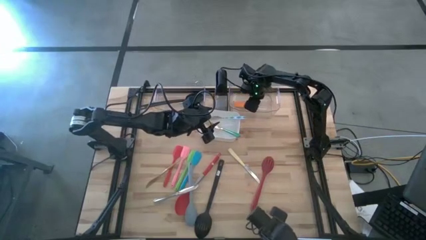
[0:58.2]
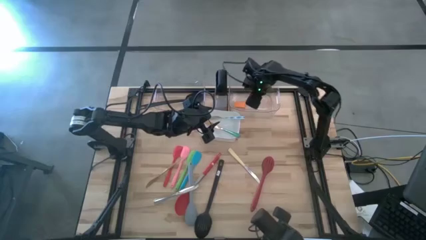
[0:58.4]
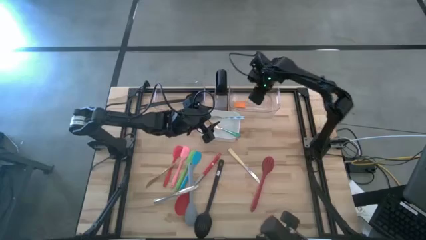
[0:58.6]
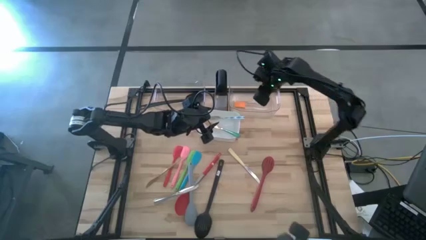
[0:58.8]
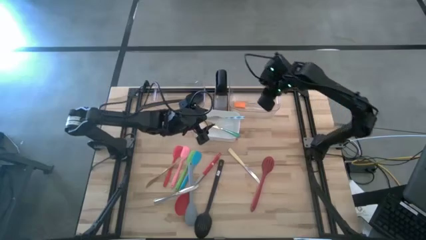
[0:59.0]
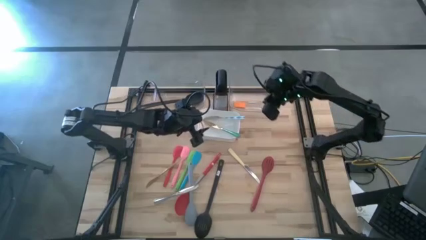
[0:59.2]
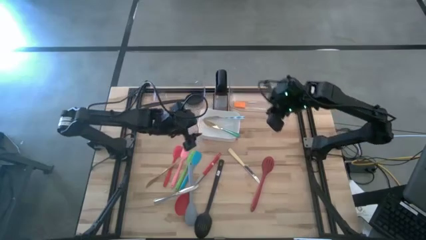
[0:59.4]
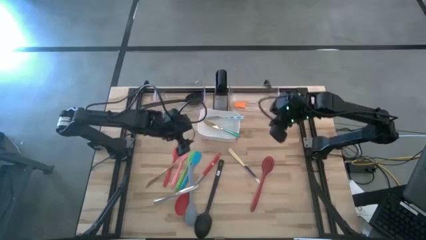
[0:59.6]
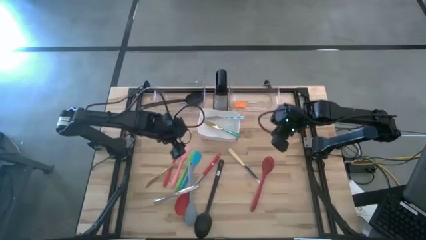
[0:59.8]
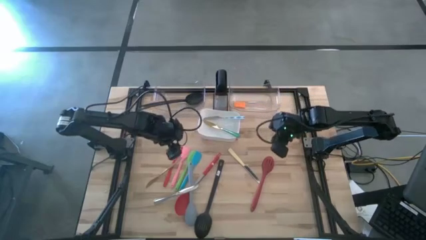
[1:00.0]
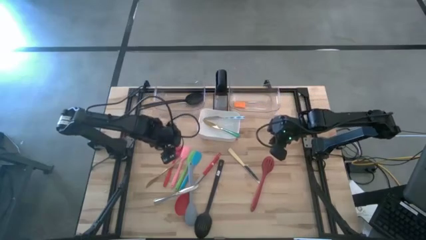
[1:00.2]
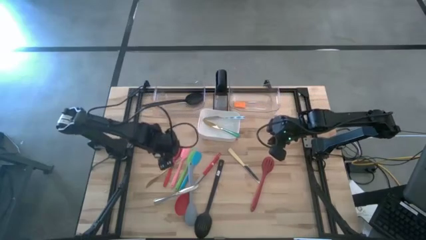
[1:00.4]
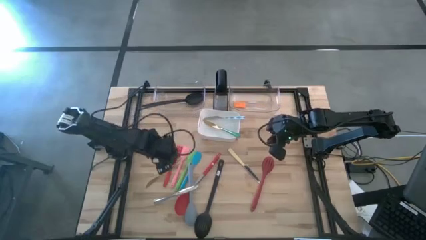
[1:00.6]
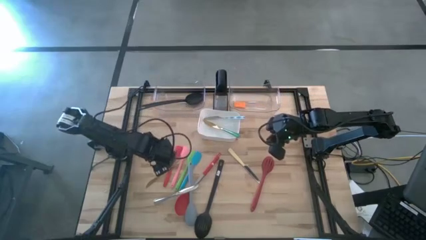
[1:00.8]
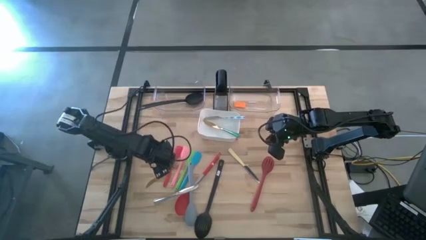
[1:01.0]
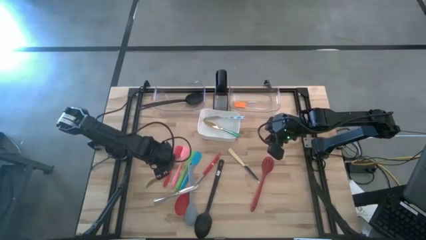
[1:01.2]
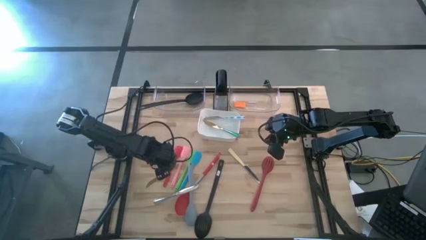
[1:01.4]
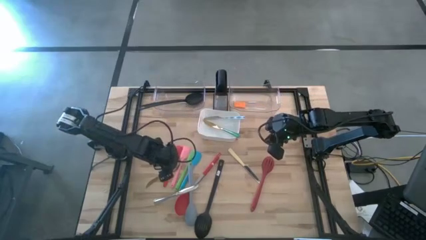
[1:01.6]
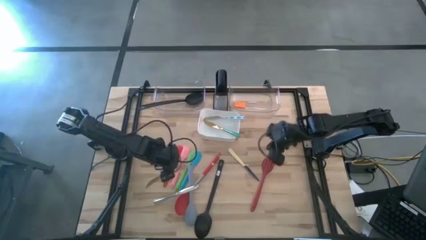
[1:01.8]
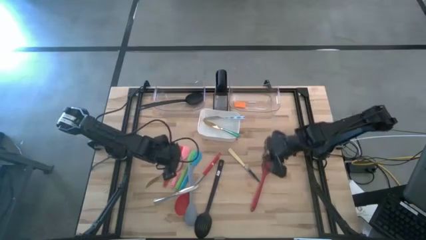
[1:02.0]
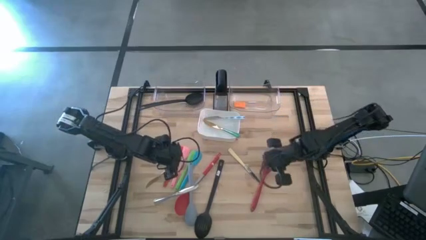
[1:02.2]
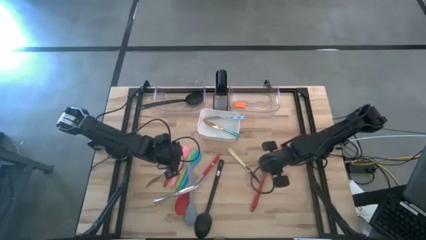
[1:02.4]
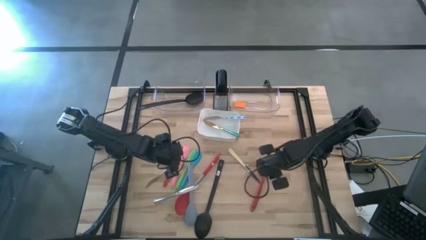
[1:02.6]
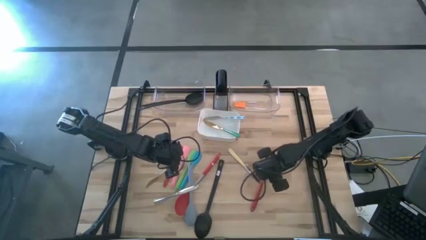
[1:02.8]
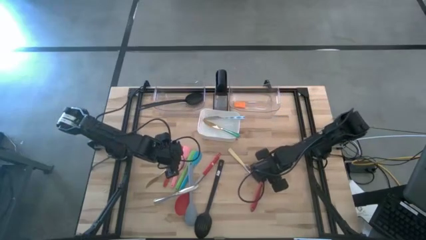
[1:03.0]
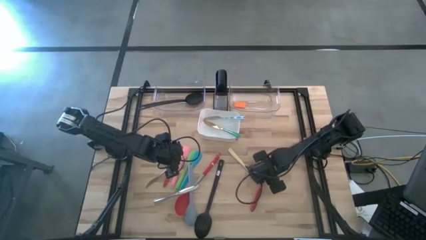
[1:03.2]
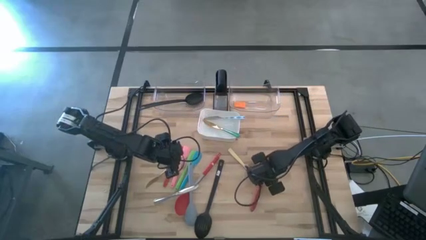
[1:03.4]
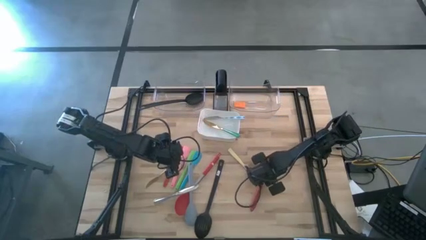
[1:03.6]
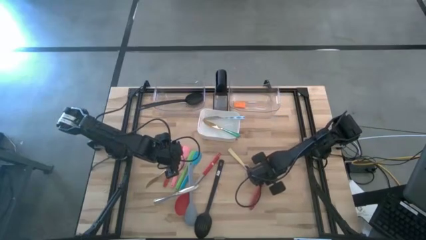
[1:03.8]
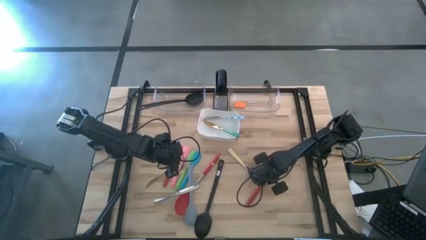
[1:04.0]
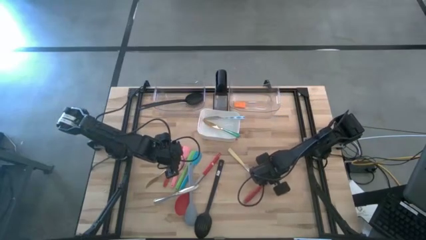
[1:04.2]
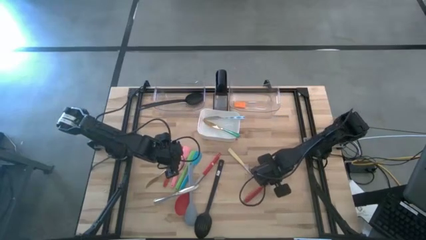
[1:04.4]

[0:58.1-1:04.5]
Task: Pick & Place Kitchen Items
Put the red slotted spoon into the left transparent bin

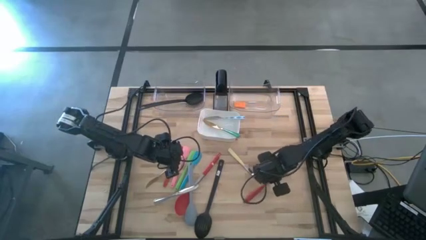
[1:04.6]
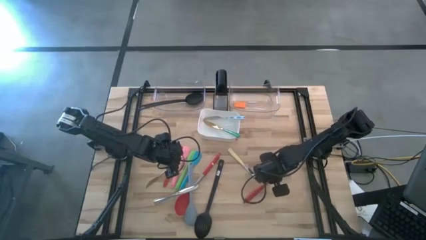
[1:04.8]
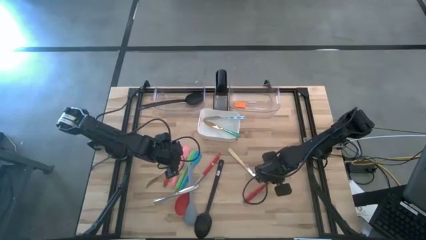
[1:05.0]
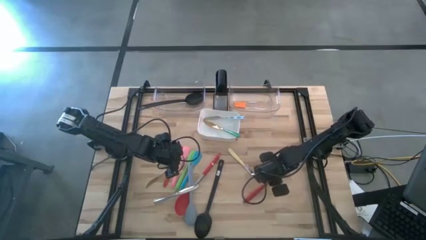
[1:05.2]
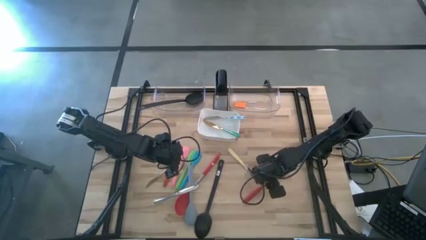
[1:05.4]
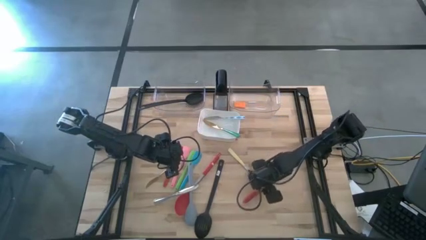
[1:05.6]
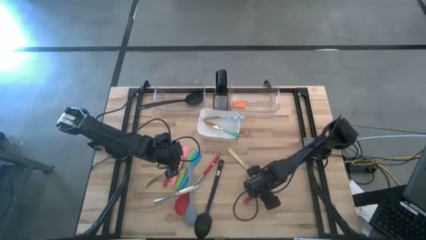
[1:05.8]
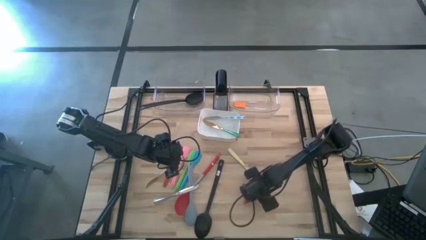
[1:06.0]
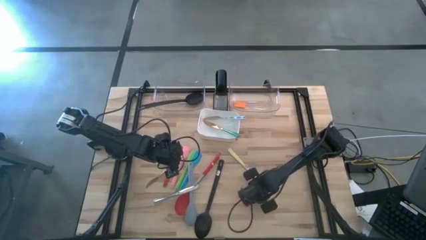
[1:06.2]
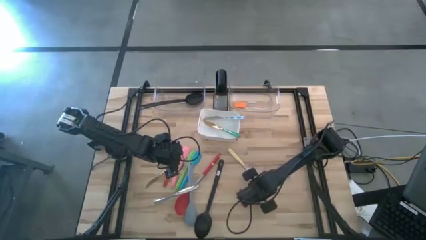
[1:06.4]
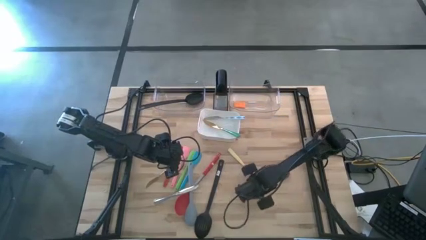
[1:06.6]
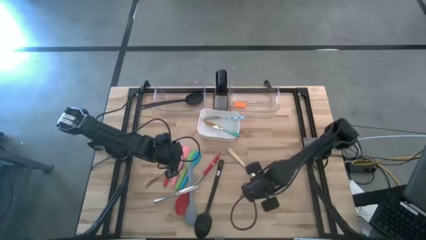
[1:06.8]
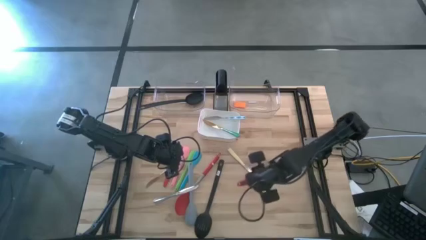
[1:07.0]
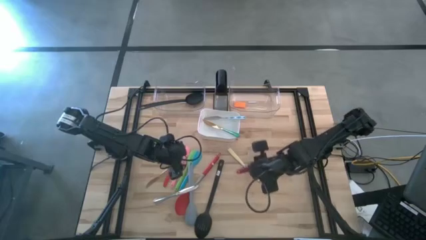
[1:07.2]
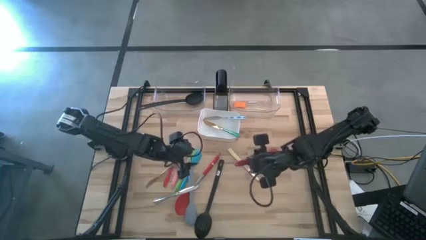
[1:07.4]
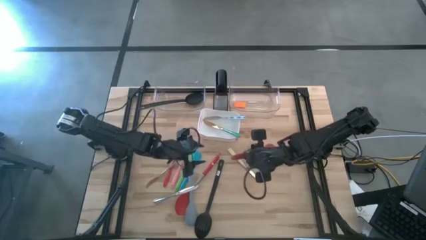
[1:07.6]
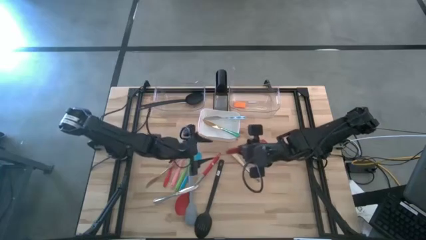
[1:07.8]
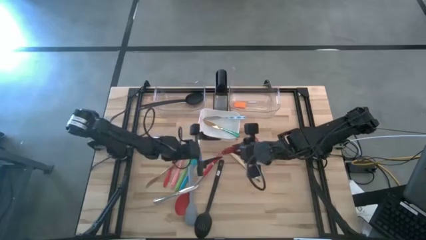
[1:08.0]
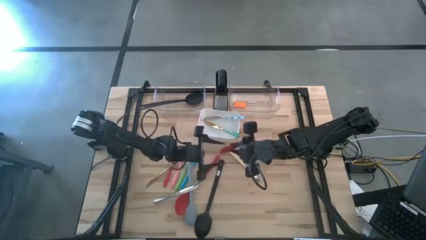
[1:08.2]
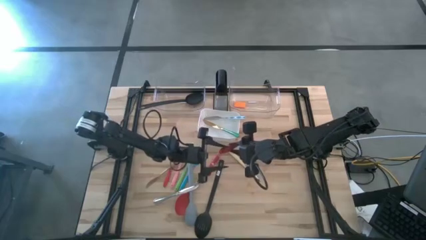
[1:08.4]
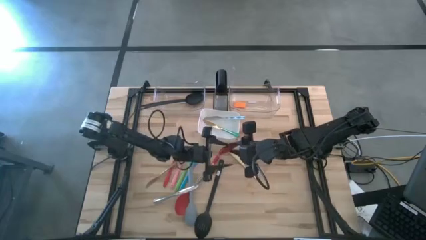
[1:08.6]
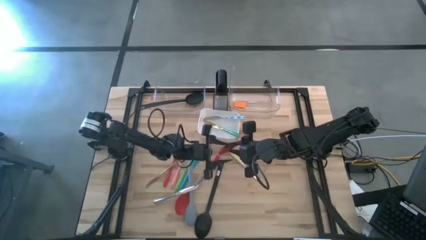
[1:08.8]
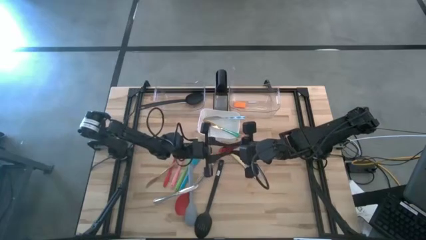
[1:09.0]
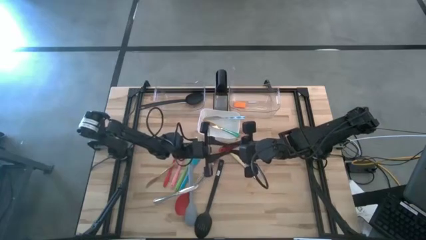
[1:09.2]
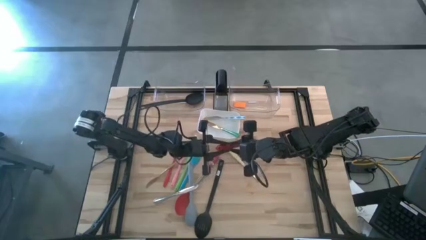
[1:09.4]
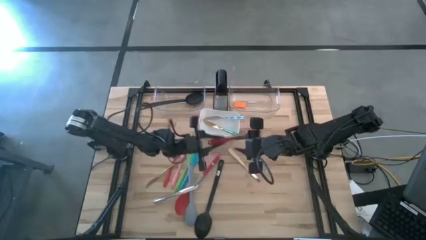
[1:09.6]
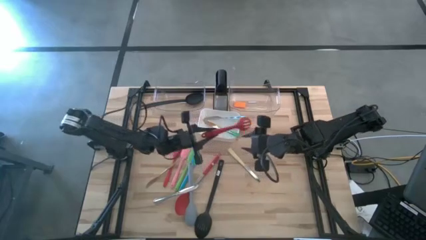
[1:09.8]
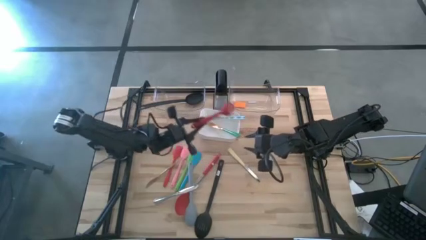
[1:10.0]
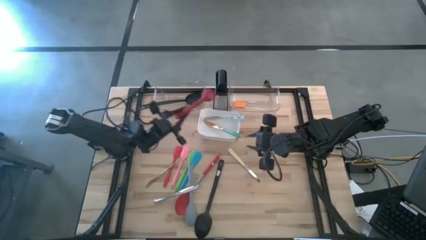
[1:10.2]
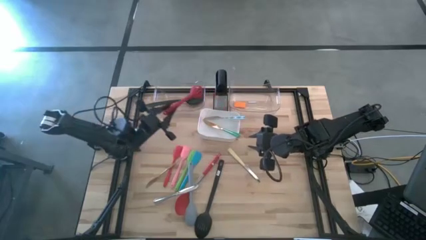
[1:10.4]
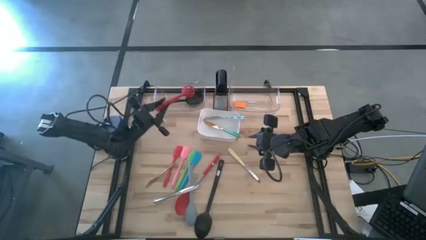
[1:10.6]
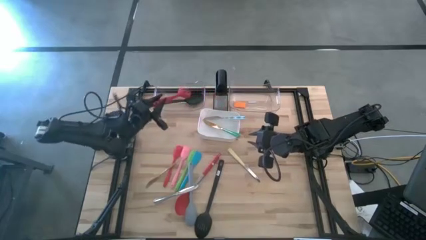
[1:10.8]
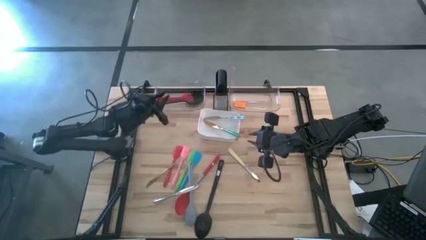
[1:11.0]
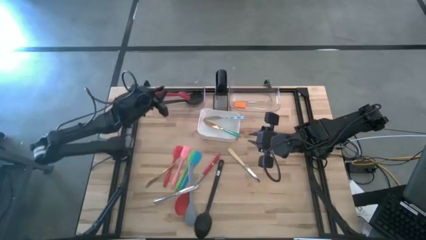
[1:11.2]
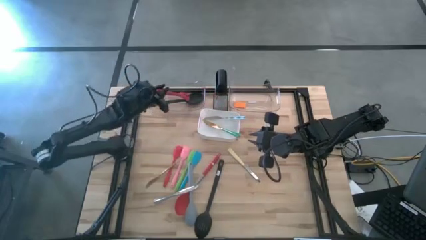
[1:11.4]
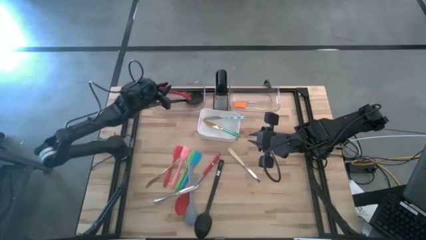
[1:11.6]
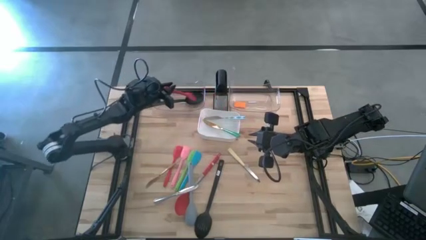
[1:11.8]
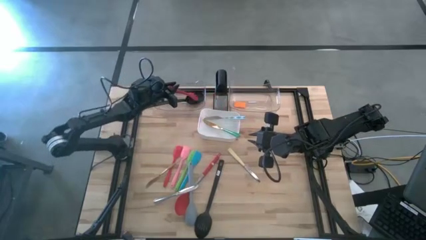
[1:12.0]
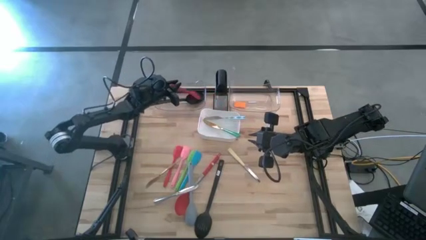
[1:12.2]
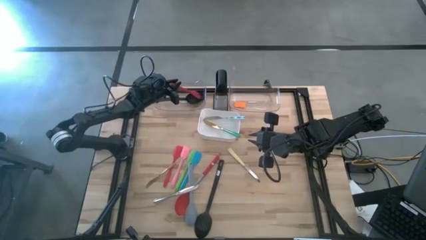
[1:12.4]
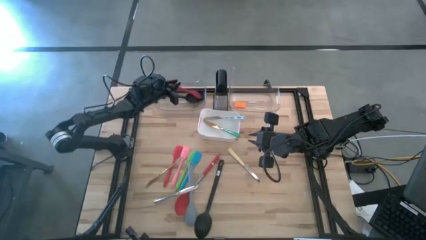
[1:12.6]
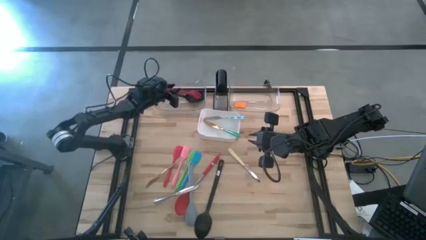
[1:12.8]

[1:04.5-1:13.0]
Put the red slotted spoon into the left transparent bin

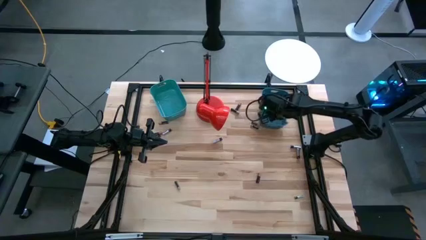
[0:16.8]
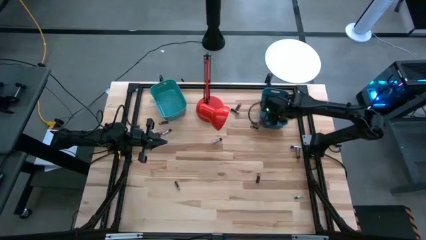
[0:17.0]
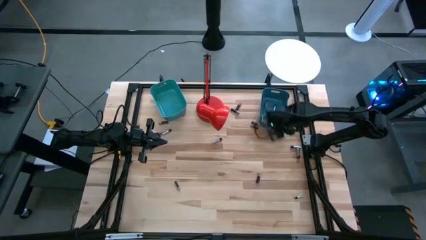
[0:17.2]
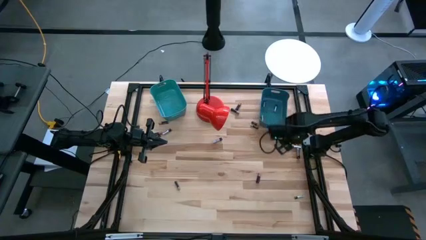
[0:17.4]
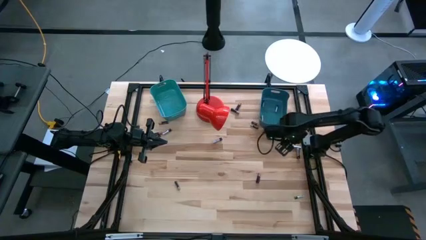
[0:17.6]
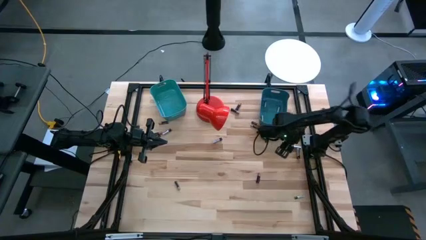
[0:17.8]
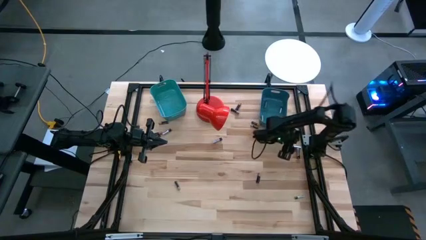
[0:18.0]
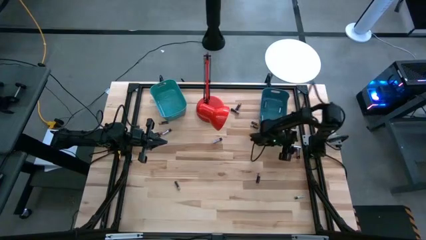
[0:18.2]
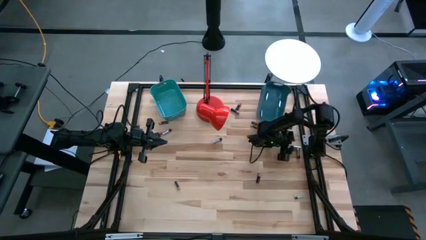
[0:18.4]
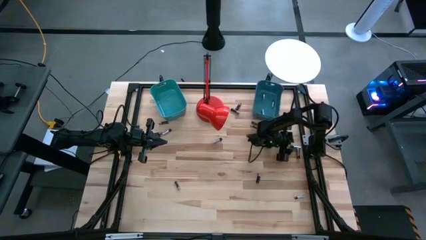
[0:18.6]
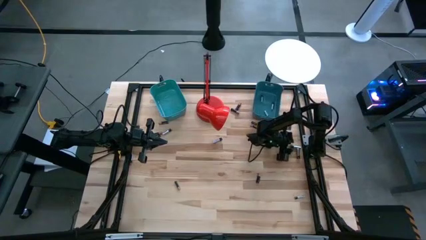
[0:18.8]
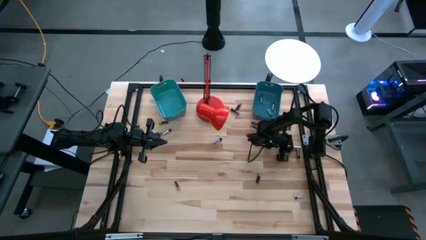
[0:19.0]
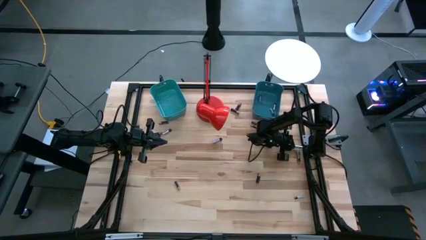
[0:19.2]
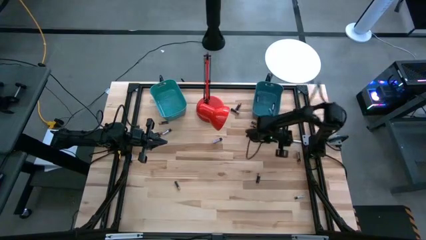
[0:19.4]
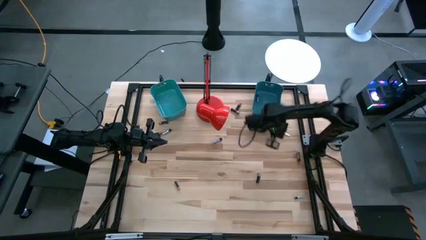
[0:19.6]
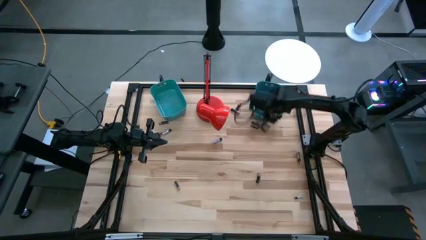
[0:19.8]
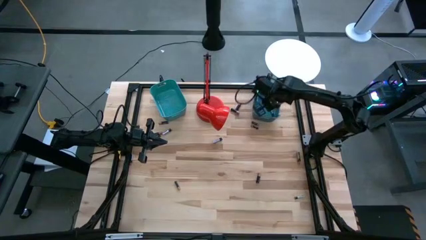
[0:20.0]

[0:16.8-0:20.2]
Task: Sort batteries
Put the silver battery into the blue bin
